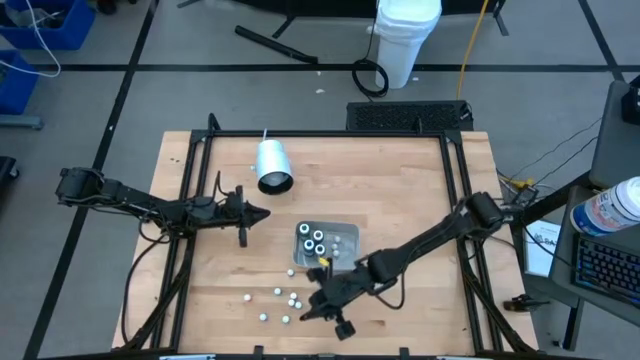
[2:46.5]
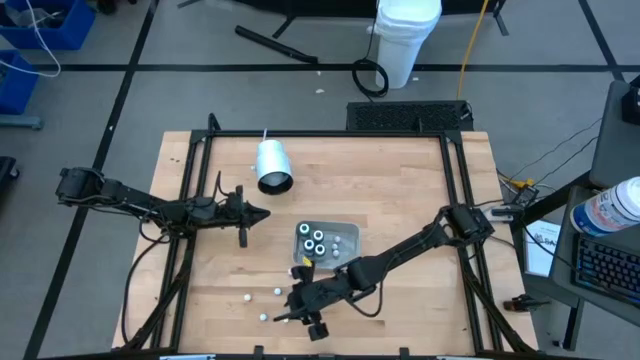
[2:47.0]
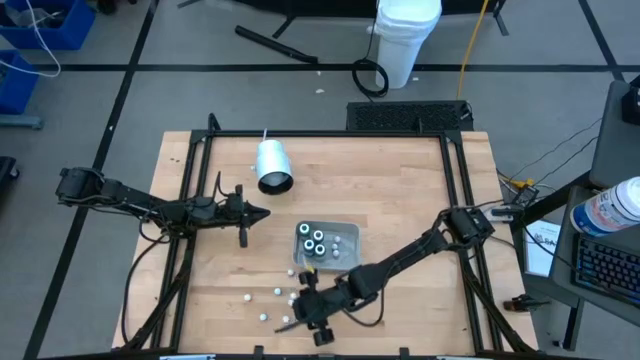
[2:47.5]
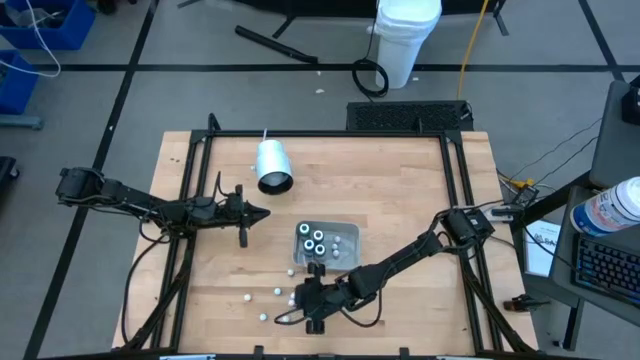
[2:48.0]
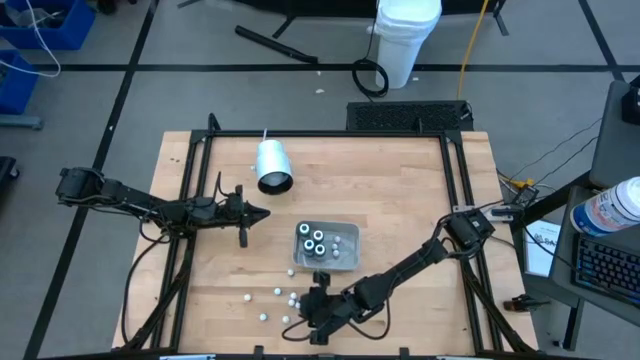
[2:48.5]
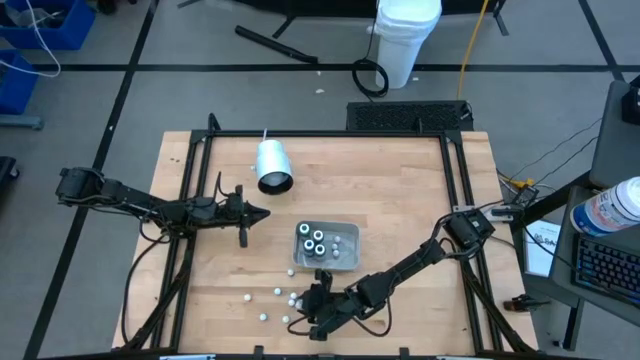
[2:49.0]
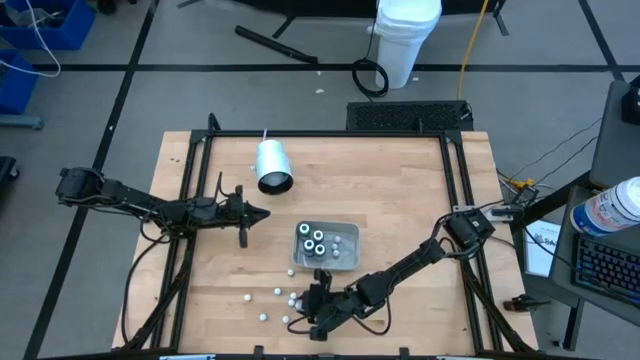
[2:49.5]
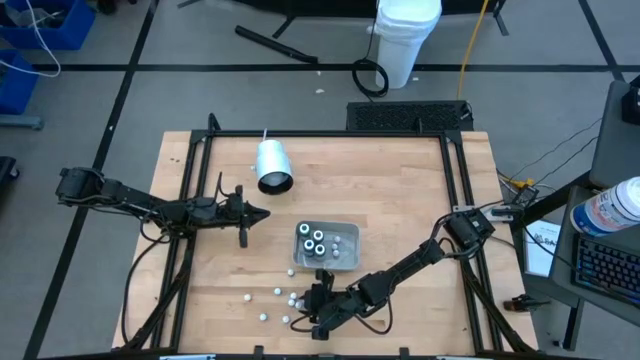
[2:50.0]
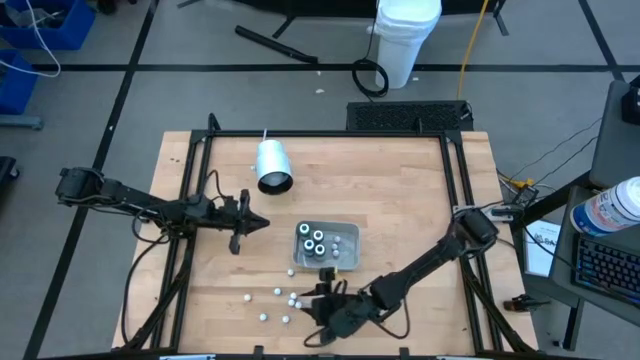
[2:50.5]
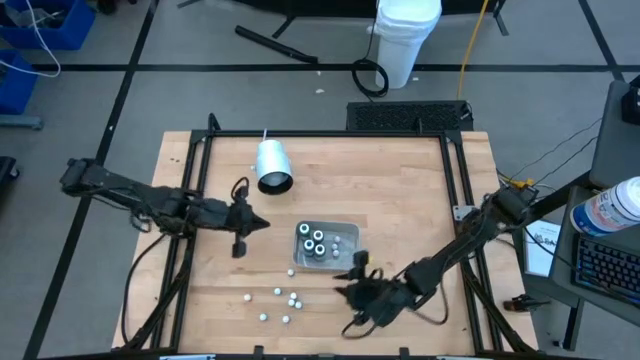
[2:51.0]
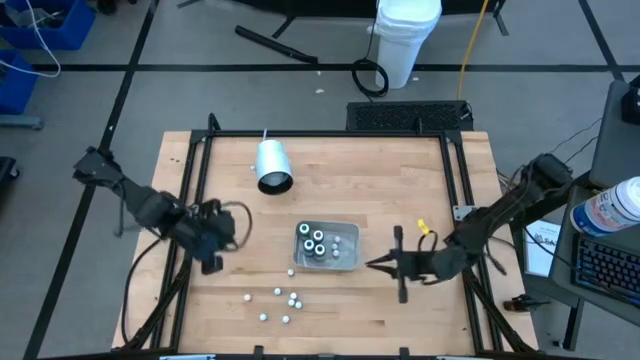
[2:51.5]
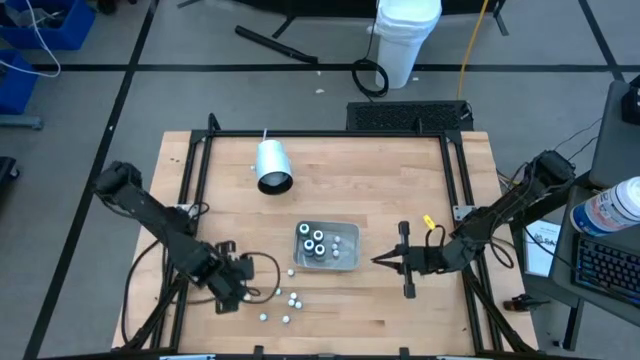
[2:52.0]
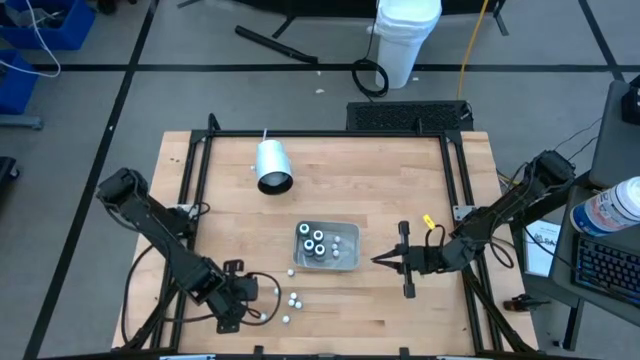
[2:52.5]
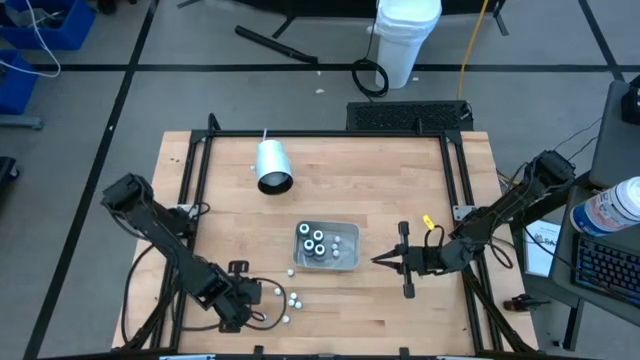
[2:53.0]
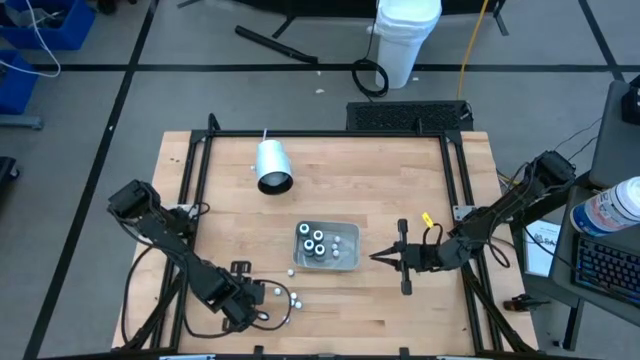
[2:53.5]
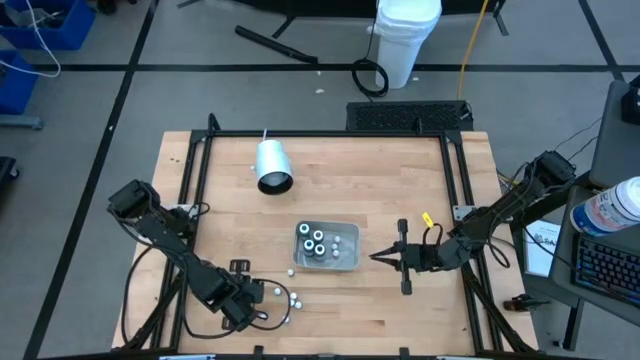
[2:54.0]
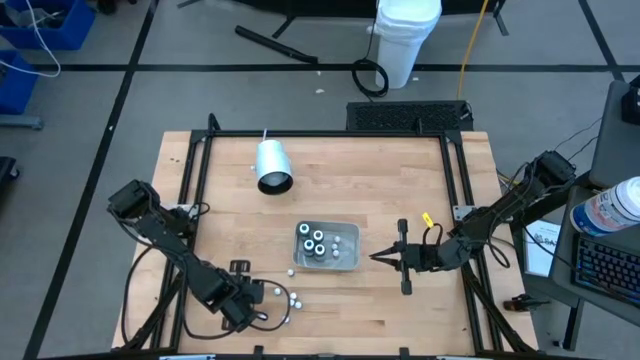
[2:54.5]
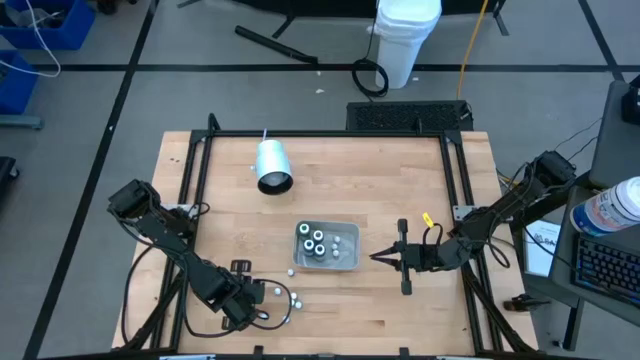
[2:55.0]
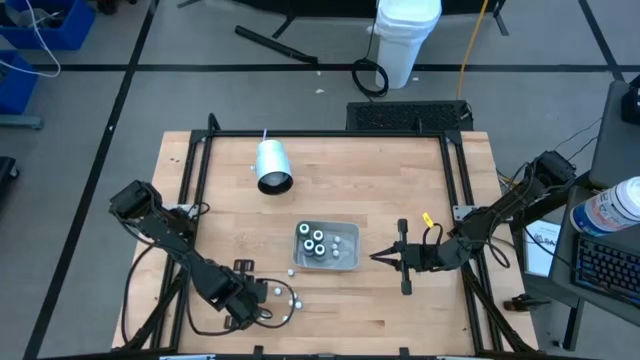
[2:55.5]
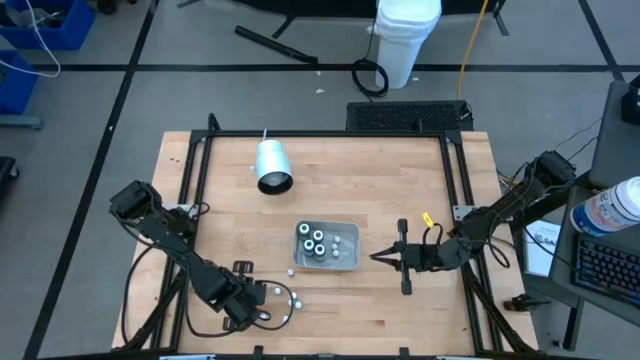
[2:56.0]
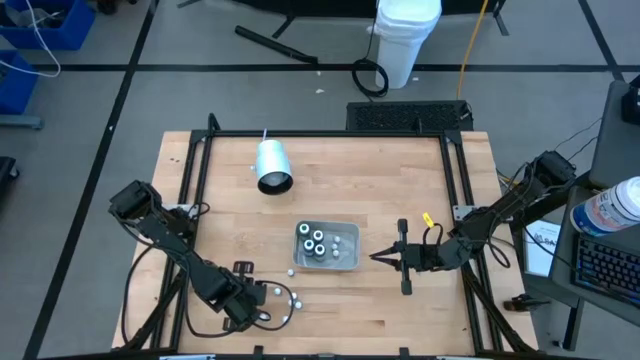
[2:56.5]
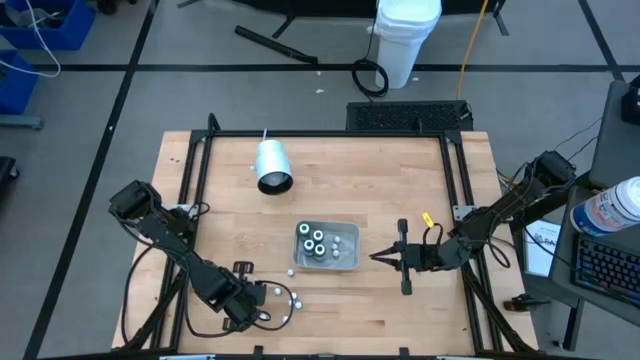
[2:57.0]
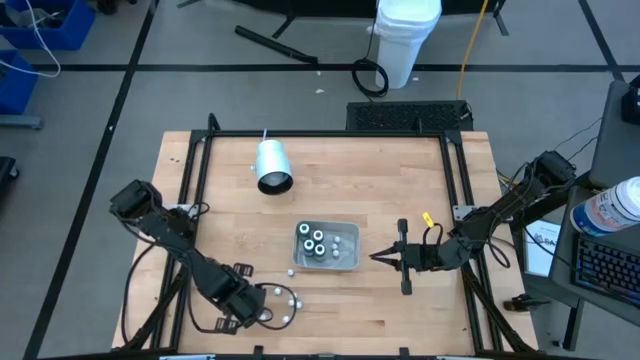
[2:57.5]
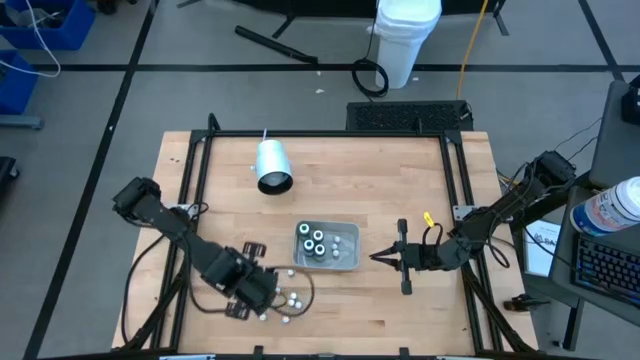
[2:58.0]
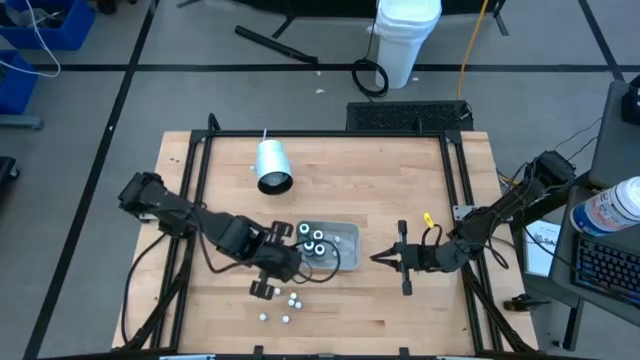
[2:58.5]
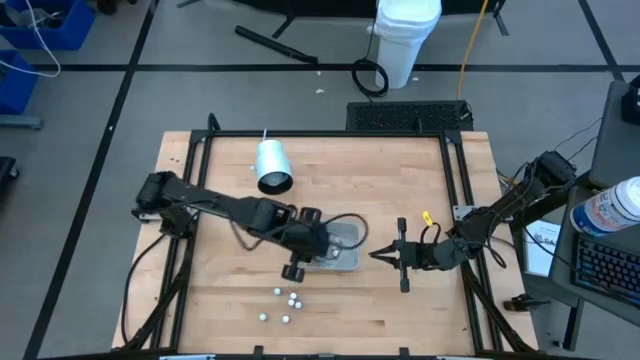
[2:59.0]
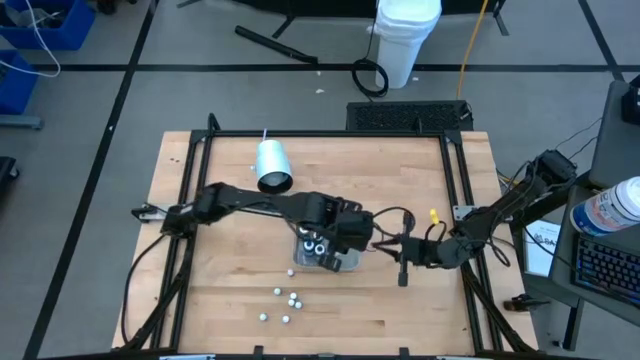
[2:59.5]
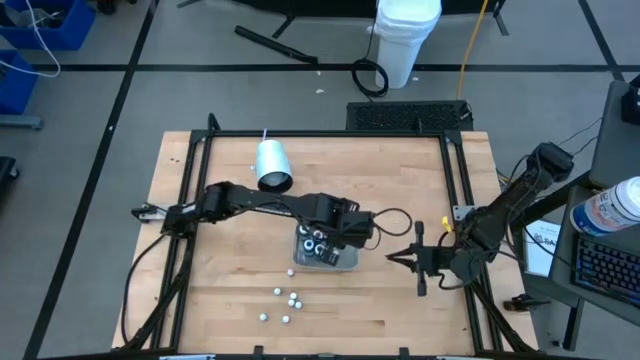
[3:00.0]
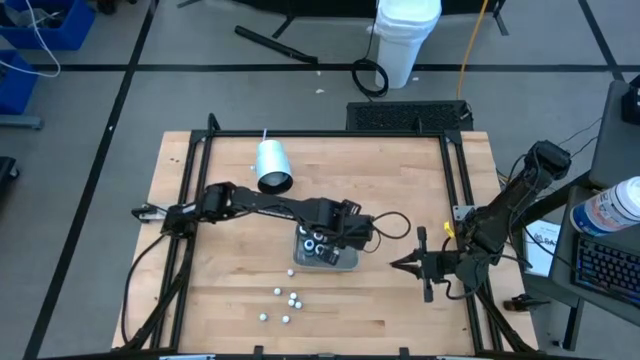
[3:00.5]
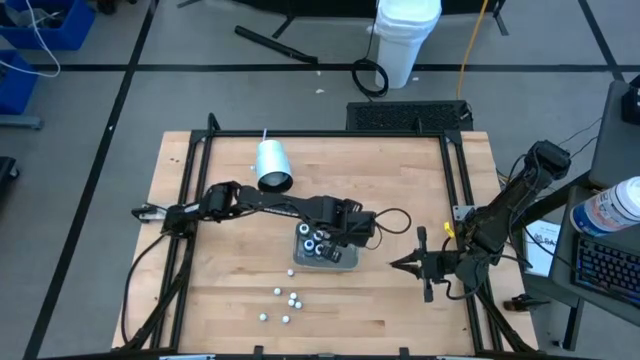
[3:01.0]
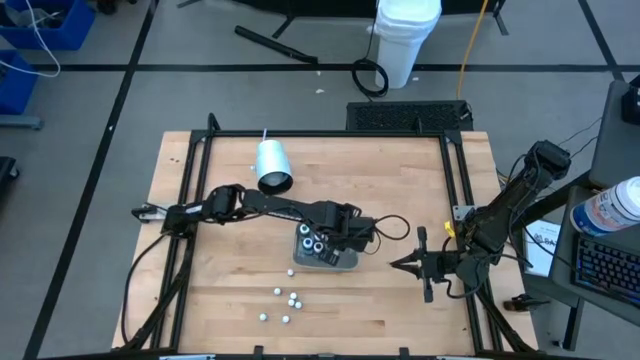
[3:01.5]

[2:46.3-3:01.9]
Task: Pick & Place food coloring
Put the orange food coloring bottle into the gray bin
